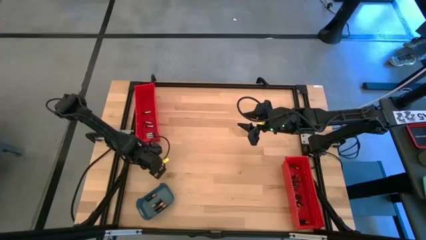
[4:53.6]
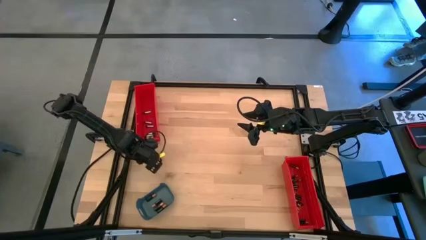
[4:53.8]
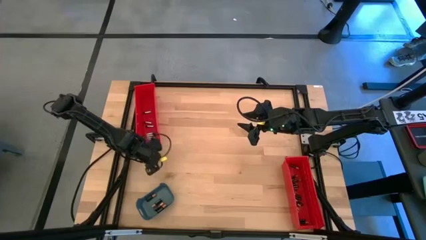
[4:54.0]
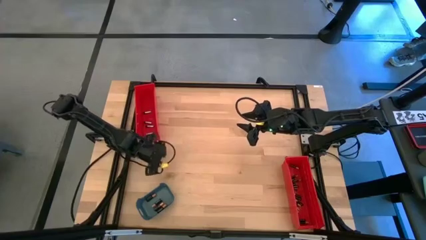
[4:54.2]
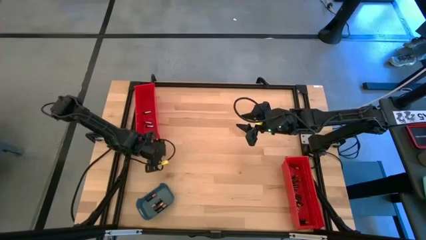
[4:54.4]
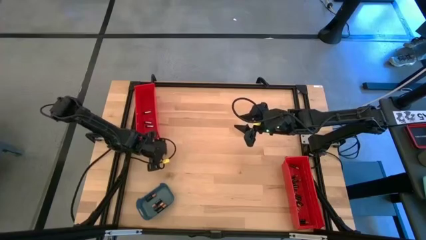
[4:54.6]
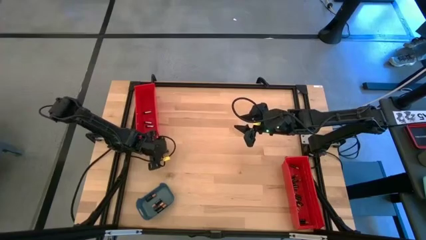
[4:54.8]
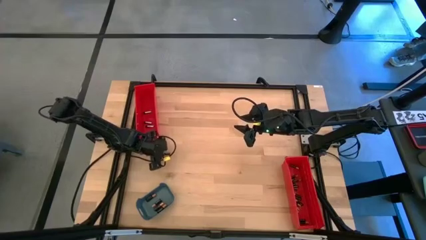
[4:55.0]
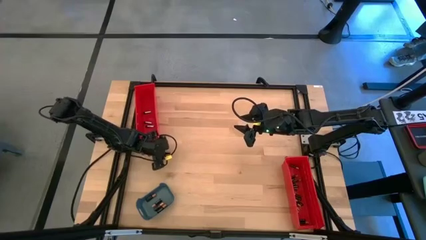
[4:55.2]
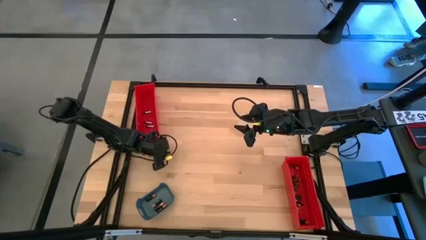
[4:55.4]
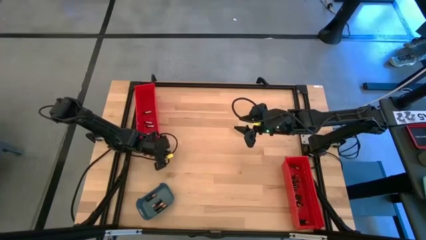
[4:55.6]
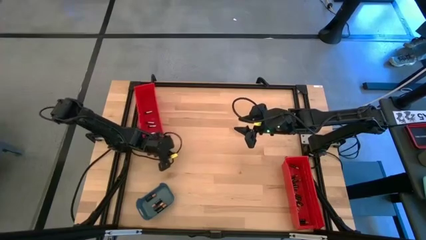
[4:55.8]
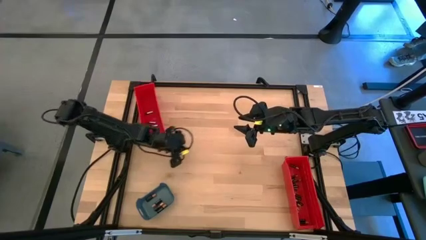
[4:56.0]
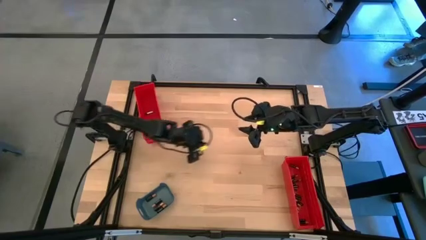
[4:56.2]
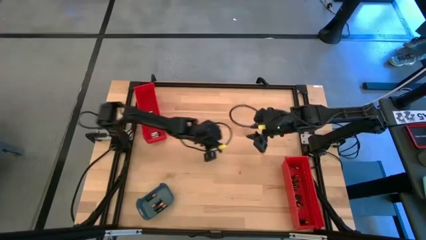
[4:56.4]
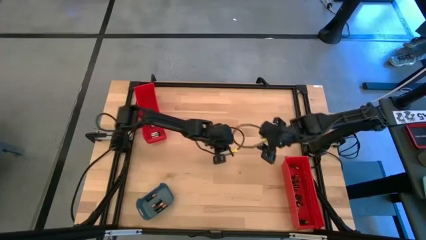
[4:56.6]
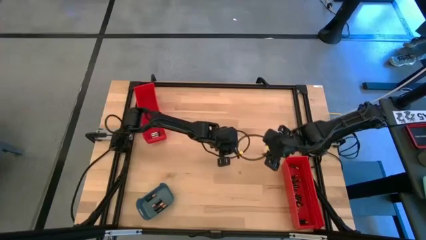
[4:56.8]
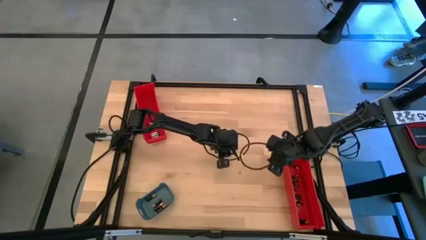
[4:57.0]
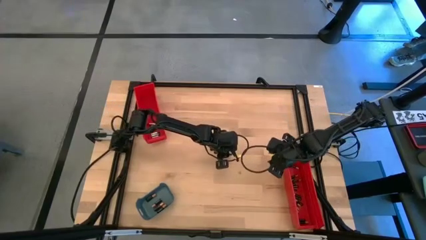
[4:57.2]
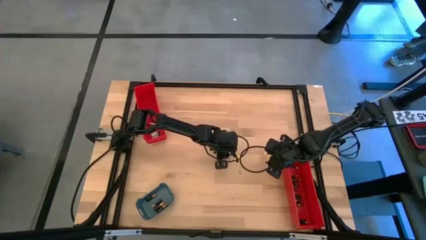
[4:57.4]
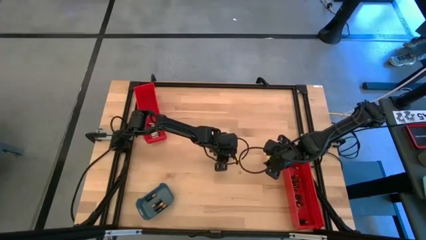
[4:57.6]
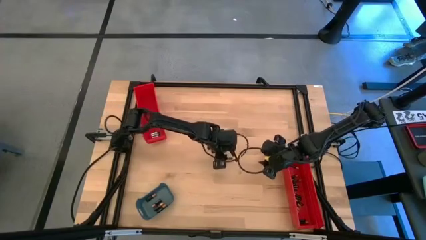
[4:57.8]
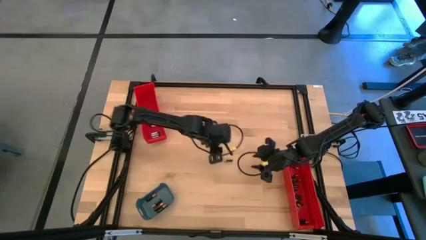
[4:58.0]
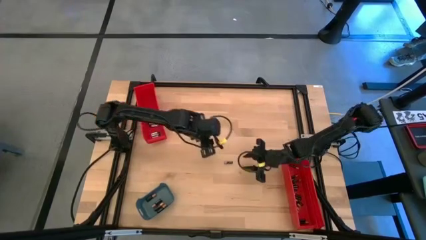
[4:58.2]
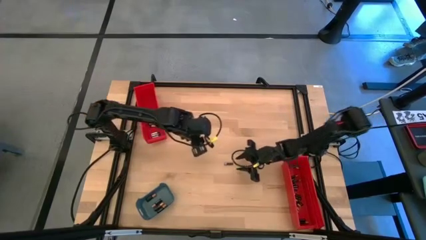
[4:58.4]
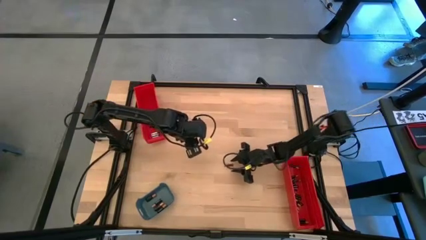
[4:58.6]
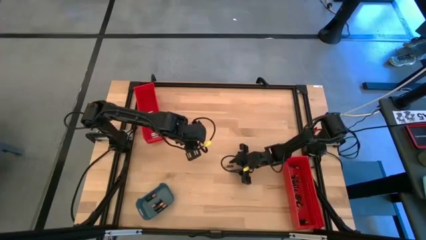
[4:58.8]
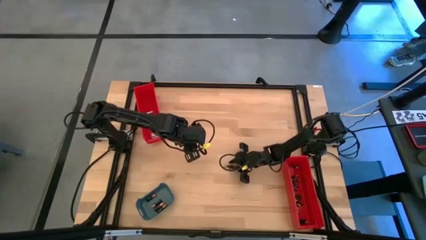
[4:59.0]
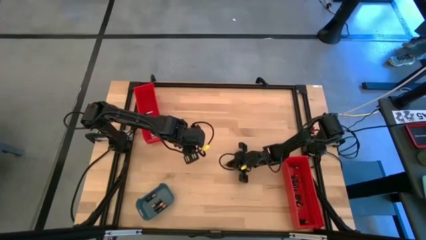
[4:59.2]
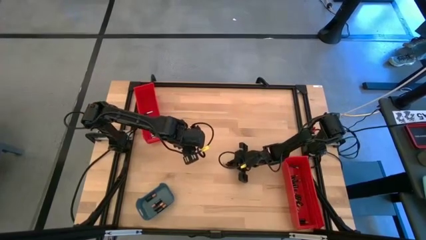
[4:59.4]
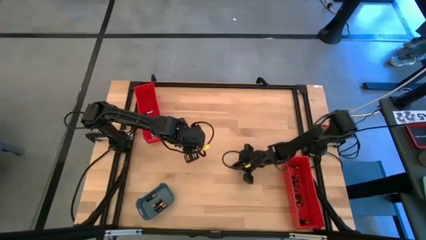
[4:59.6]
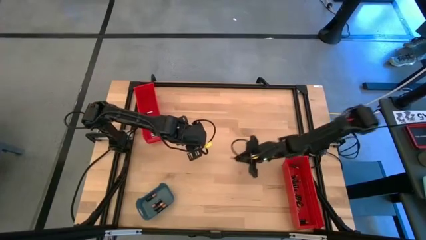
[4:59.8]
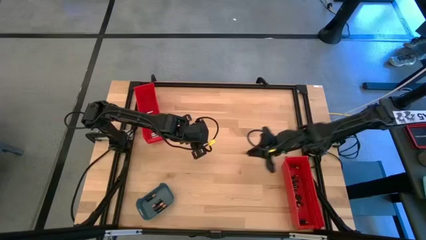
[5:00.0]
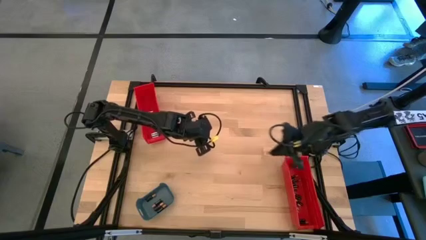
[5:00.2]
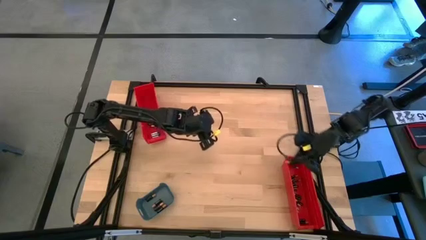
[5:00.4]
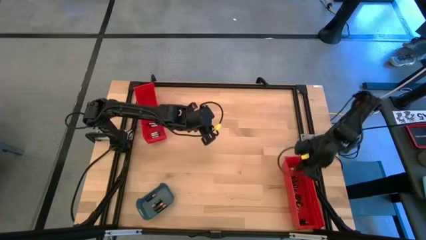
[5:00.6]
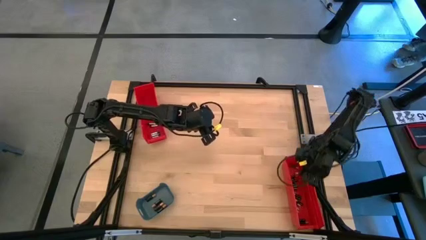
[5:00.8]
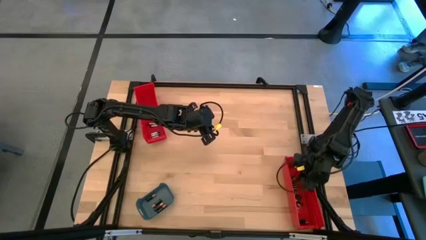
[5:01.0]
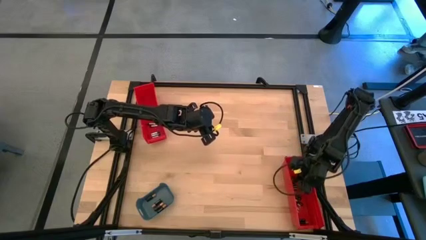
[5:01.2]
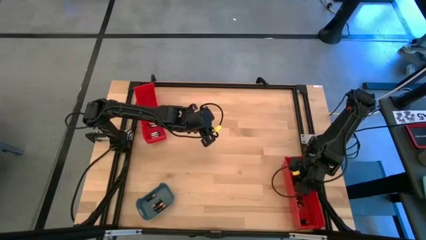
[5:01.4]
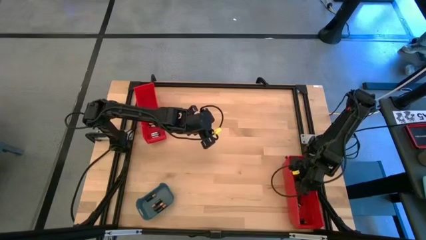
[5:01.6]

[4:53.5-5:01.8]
Task: Sort batteries
Put the small black battery into the bottom red bin

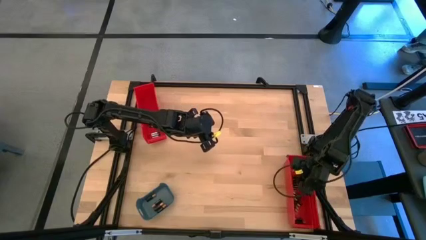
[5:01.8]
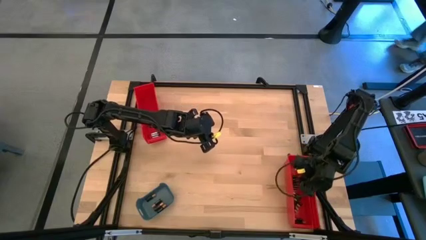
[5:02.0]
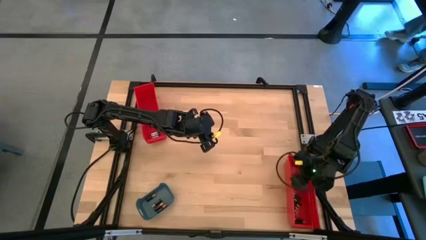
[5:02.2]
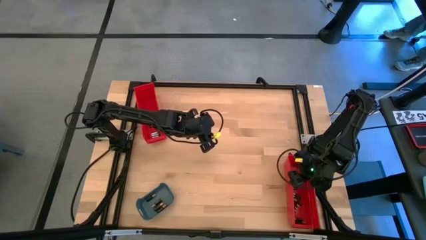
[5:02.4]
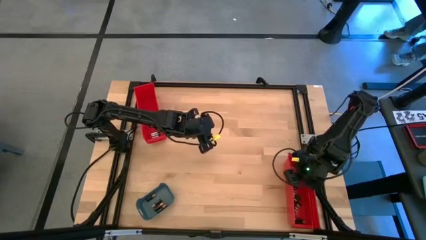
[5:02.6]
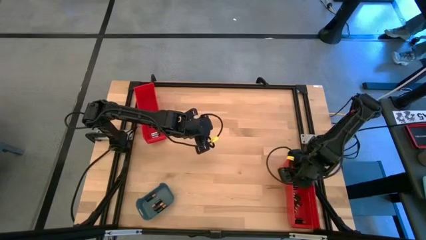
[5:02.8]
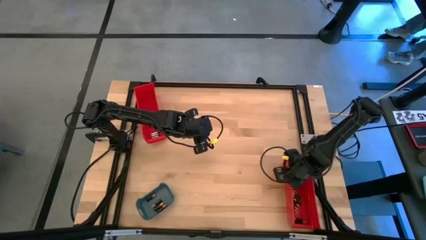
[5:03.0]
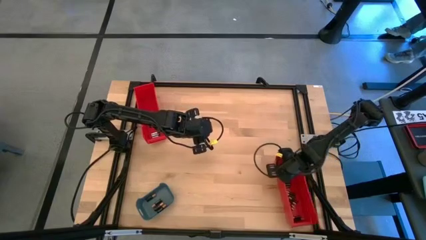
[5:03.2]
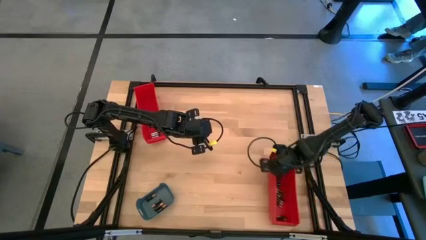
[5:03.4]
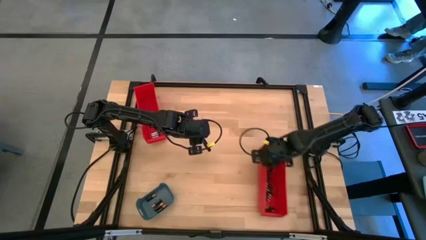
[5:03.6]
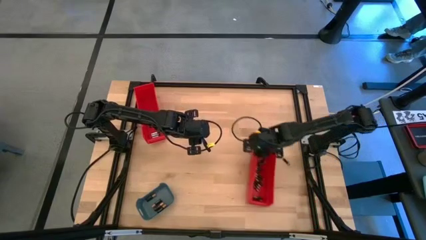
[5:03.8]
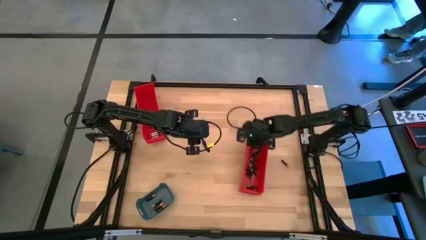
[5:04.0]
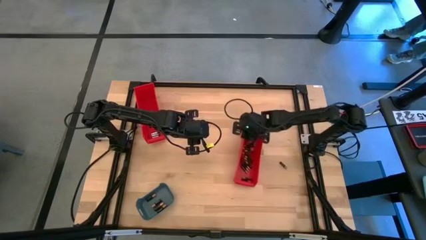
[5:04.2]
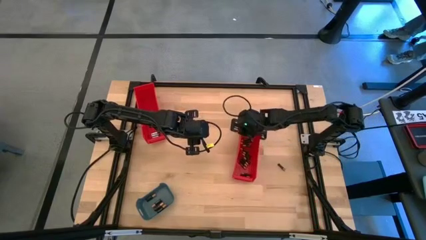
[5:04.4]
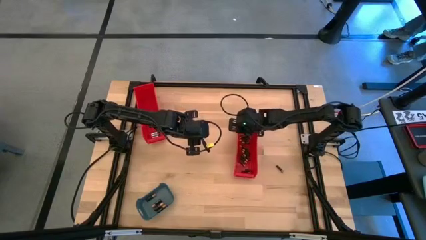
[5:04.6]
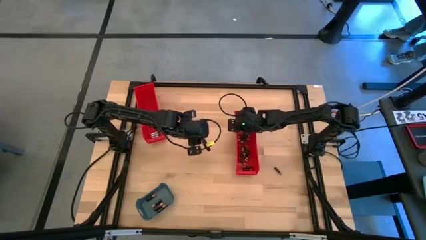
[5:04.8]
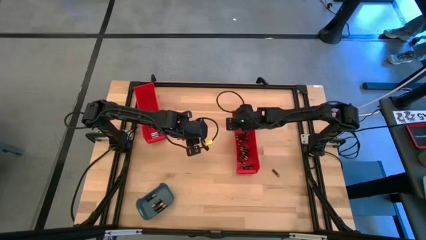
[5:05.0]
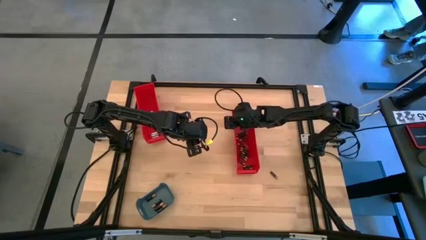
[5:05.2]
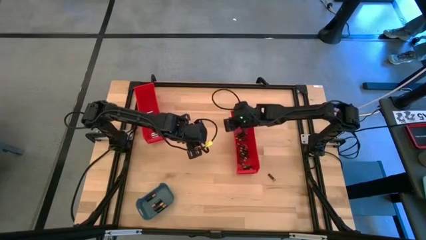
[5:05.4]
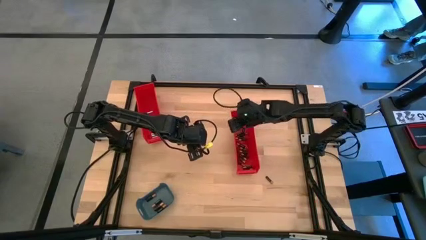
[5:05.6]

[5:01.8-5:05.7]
Move the bottom red bin to the center of the table
